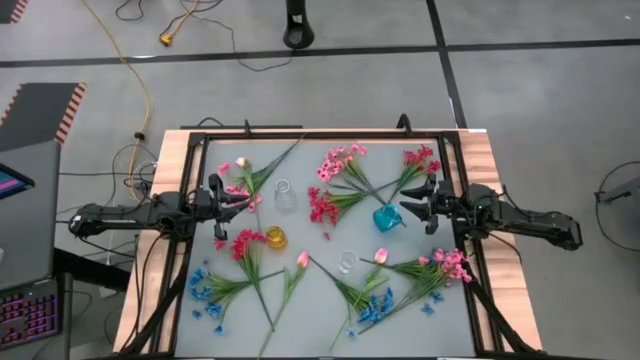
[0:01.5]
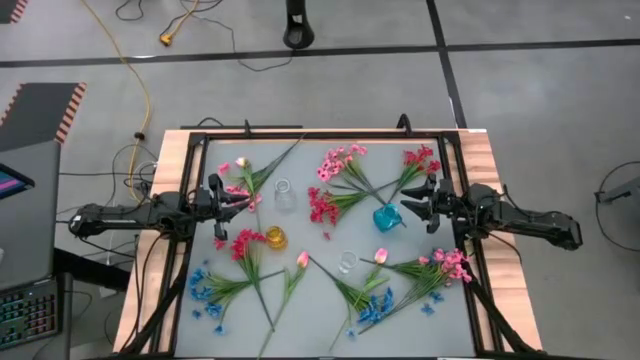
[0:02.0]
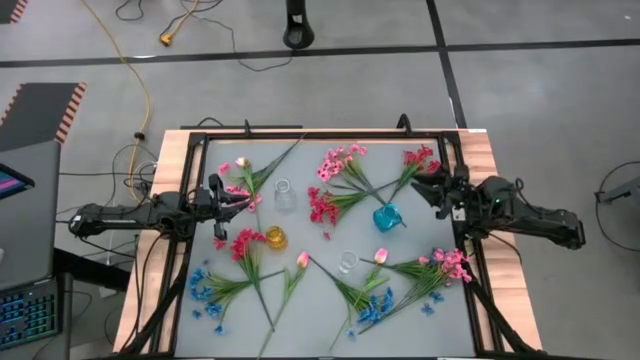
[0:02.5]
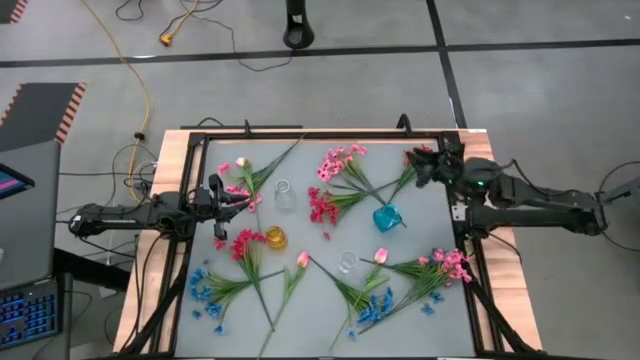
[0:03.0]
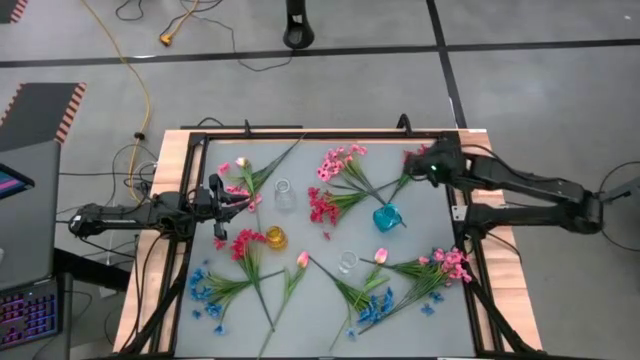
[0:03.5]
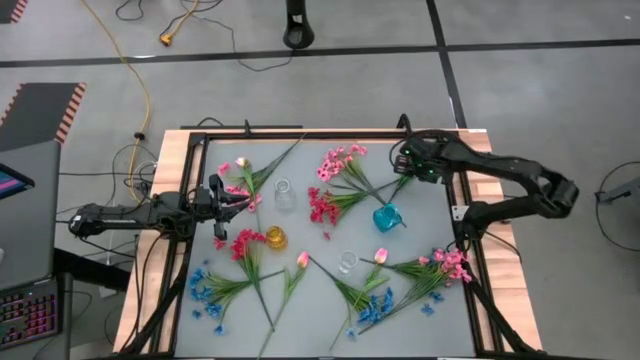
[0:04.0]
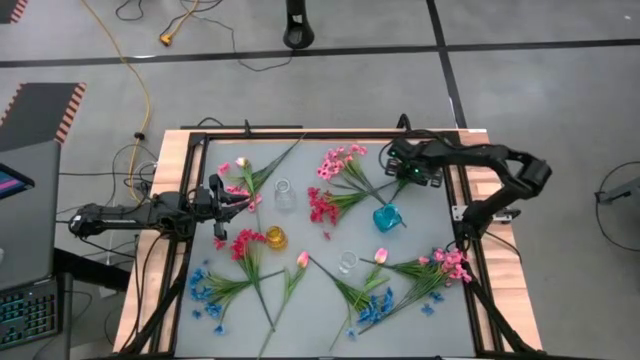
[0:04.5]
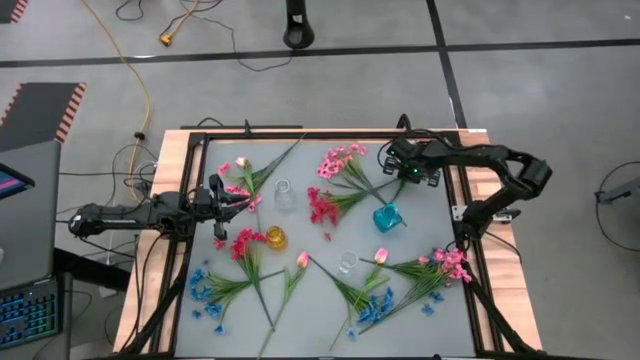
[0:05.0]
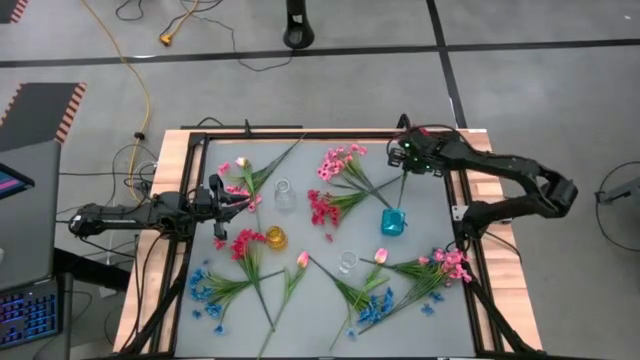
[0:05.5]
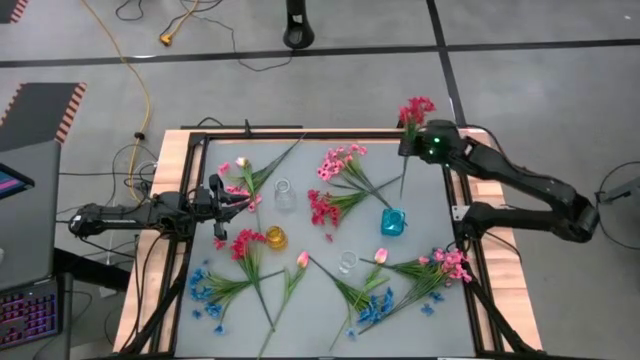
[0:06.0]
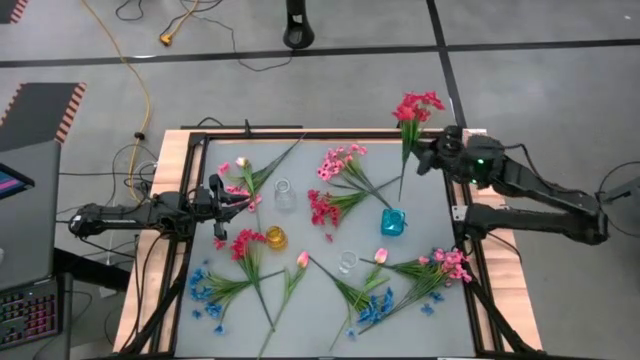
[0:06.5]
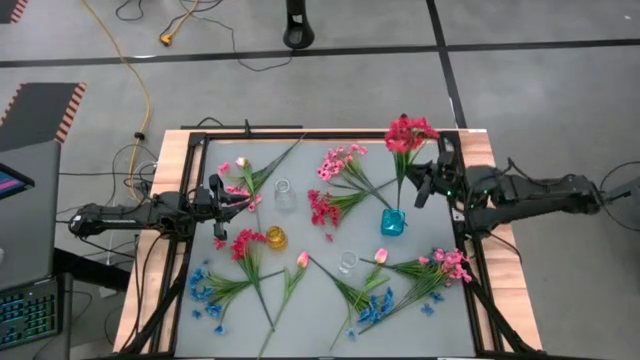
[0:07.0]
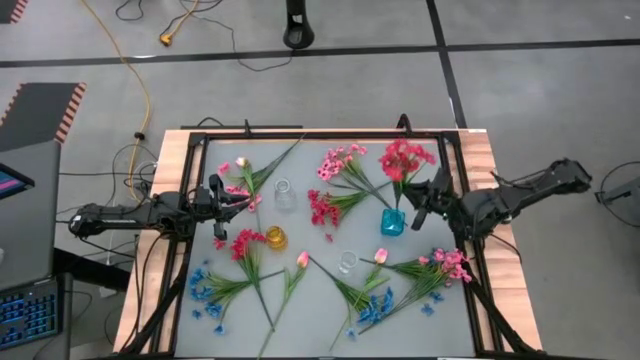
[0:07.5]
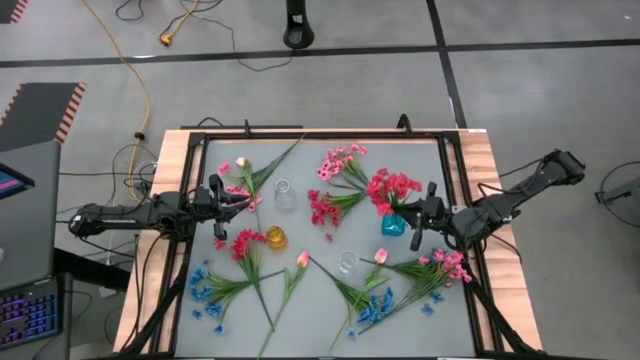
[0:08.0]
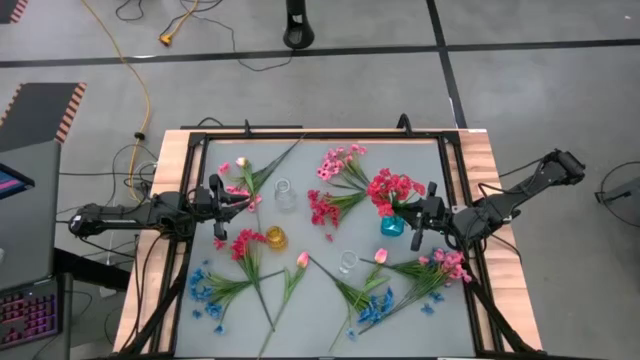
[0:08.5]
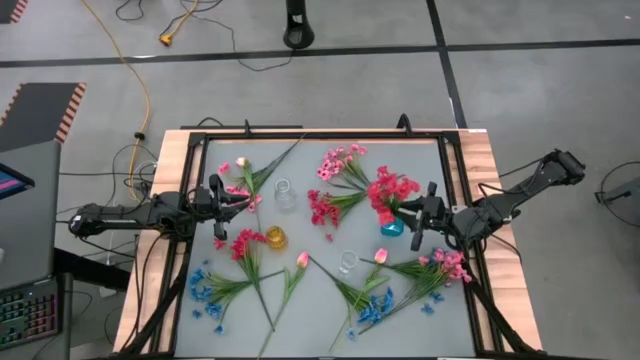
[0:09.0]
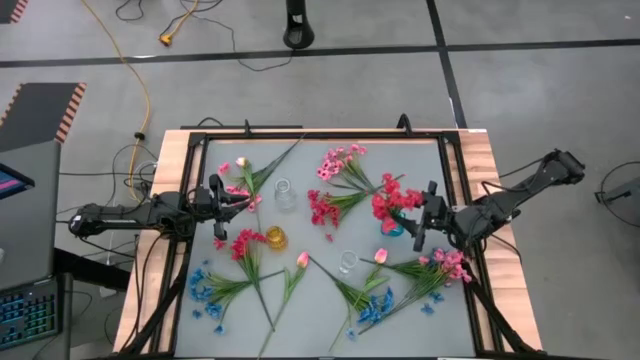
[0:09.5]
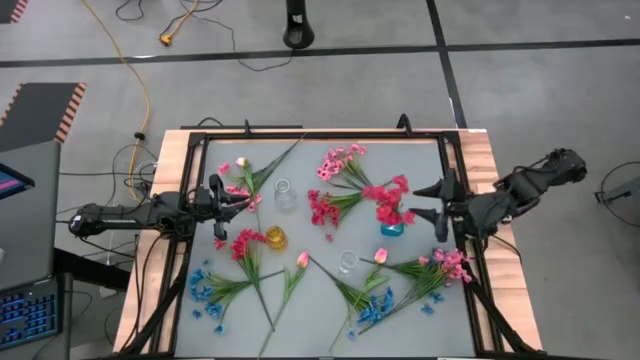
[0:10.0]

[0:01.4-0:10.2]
Task: Sort flowers into vase by color
Put the top right red flowers into the blue vase

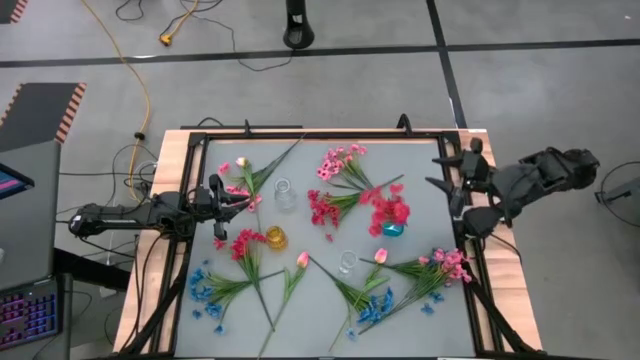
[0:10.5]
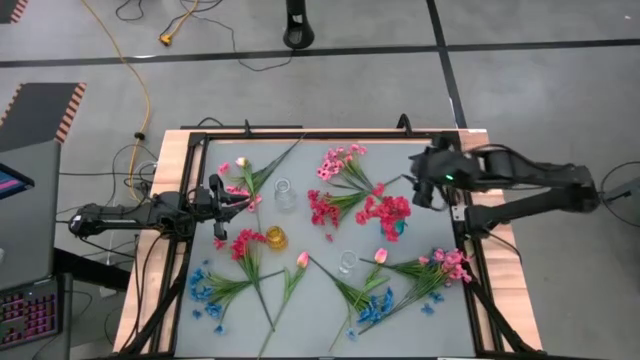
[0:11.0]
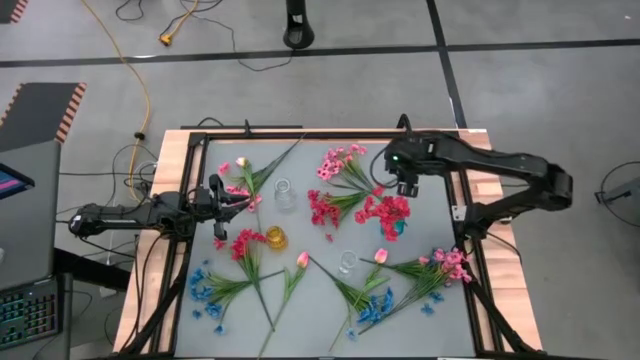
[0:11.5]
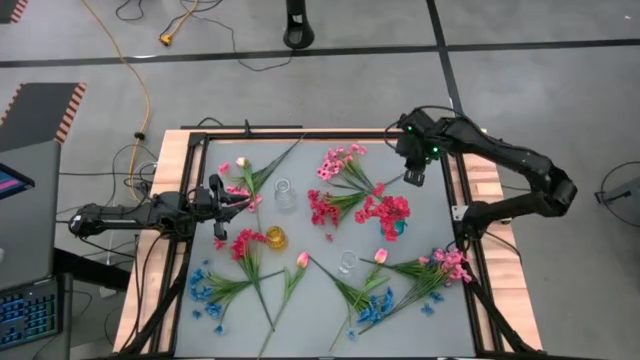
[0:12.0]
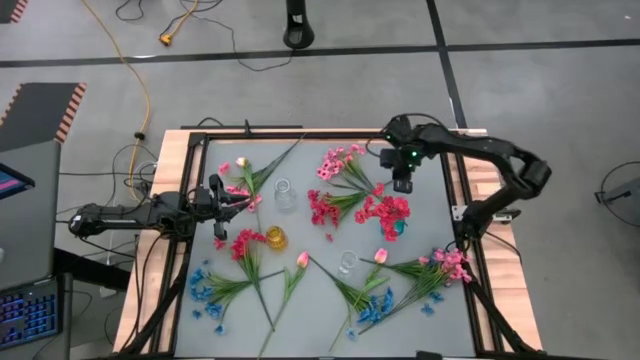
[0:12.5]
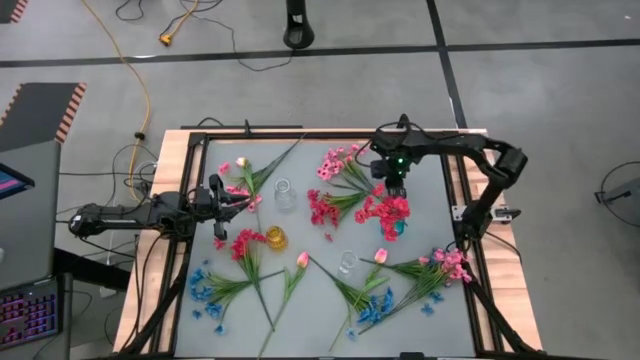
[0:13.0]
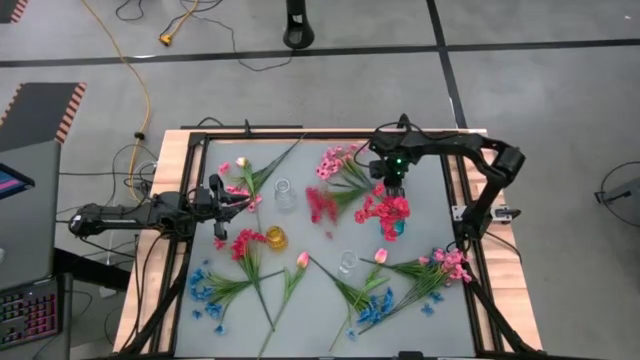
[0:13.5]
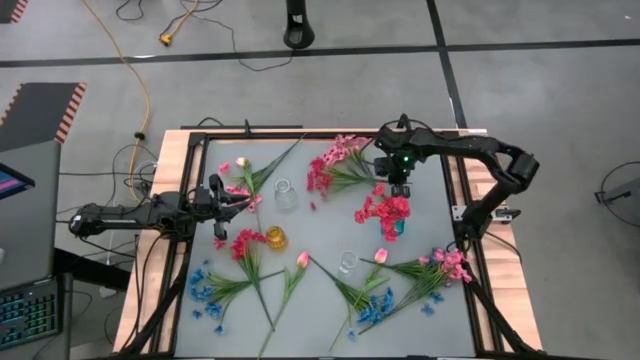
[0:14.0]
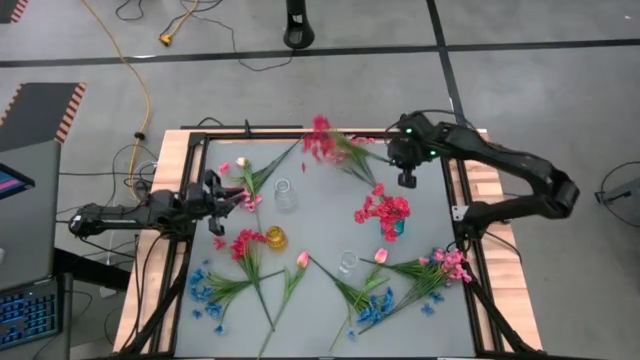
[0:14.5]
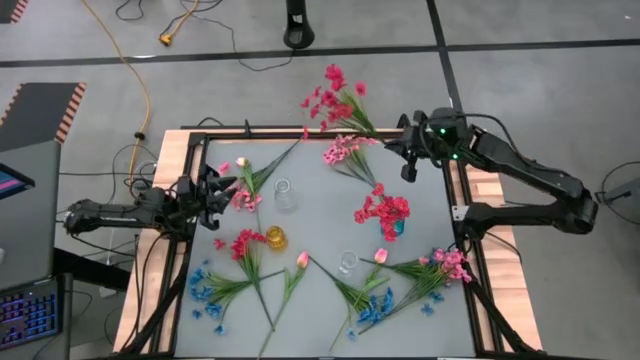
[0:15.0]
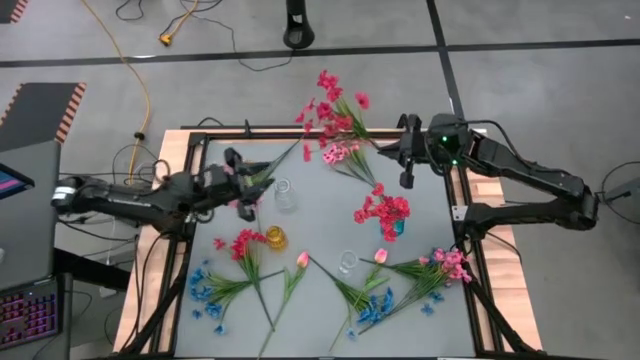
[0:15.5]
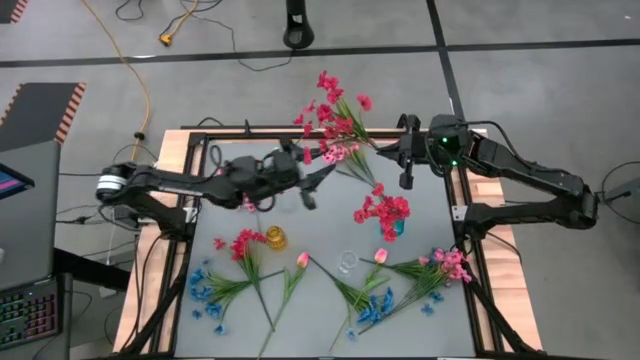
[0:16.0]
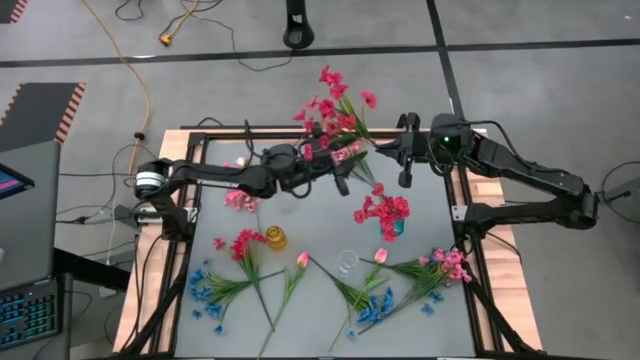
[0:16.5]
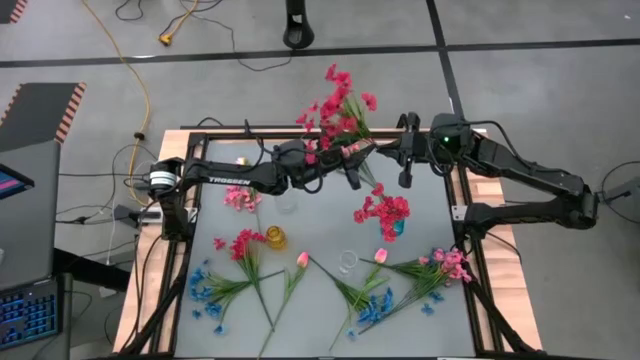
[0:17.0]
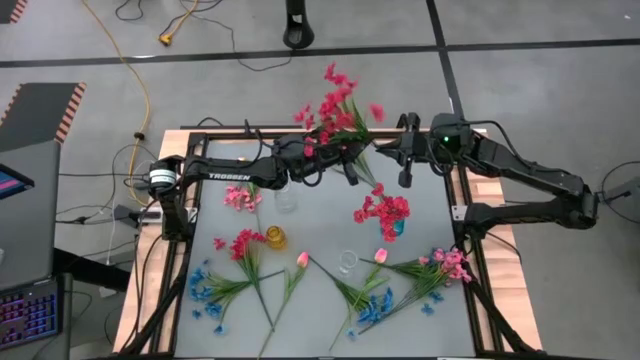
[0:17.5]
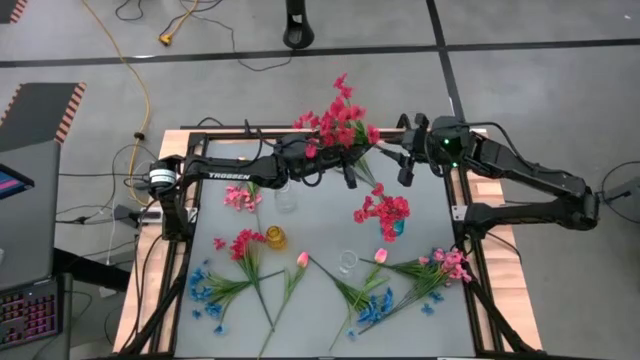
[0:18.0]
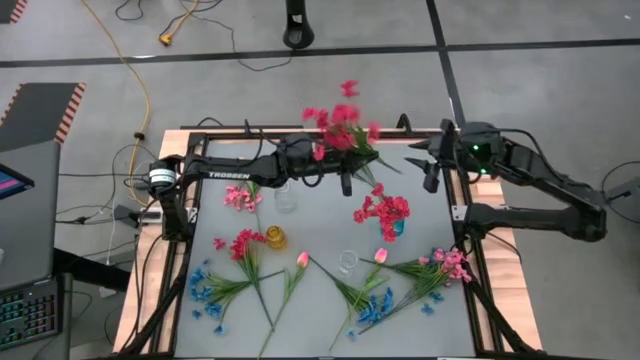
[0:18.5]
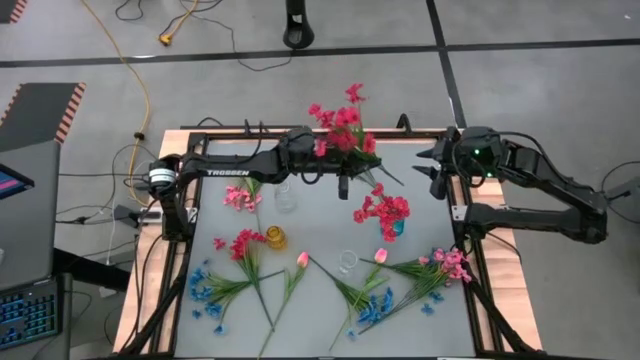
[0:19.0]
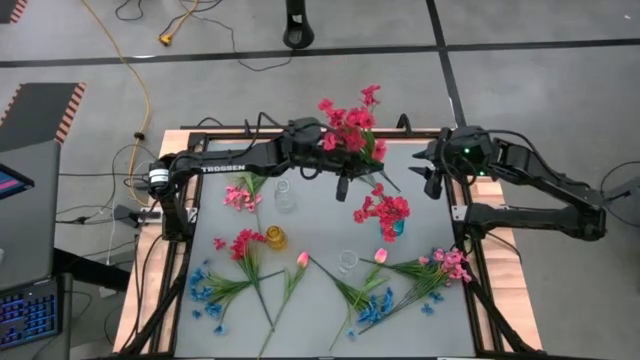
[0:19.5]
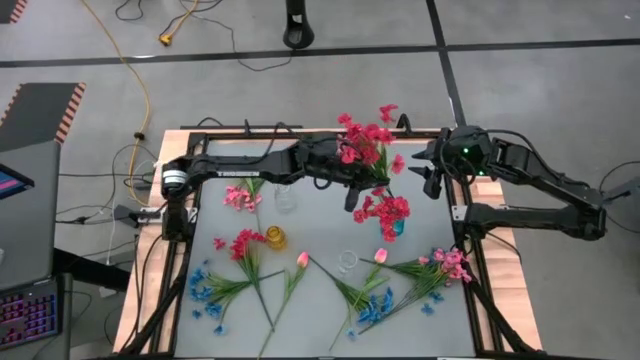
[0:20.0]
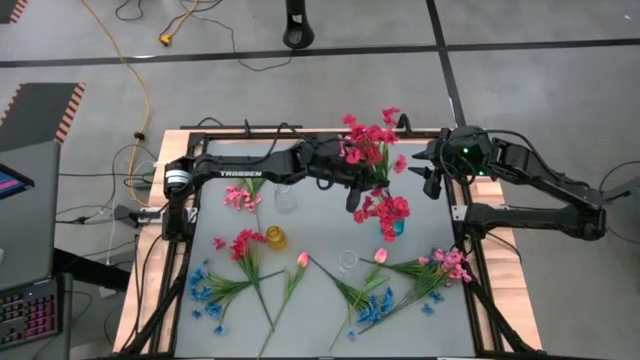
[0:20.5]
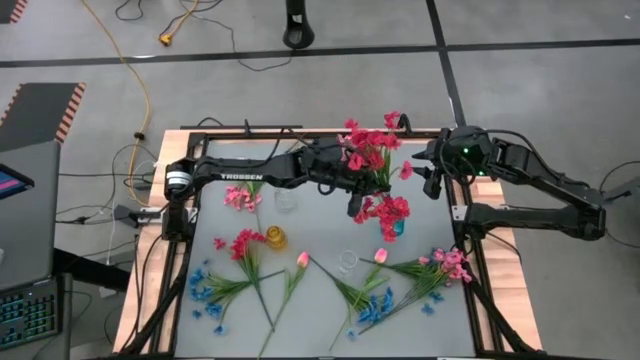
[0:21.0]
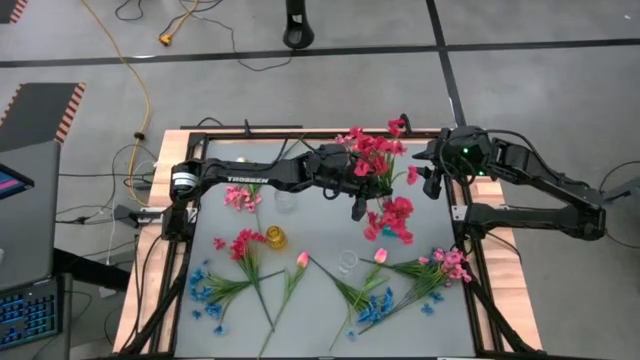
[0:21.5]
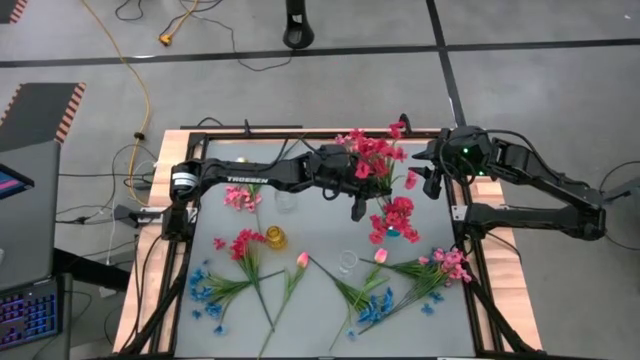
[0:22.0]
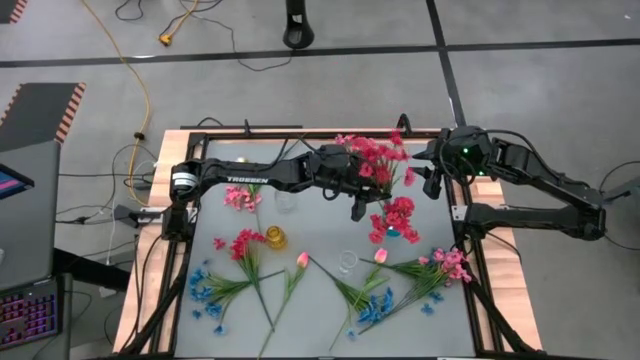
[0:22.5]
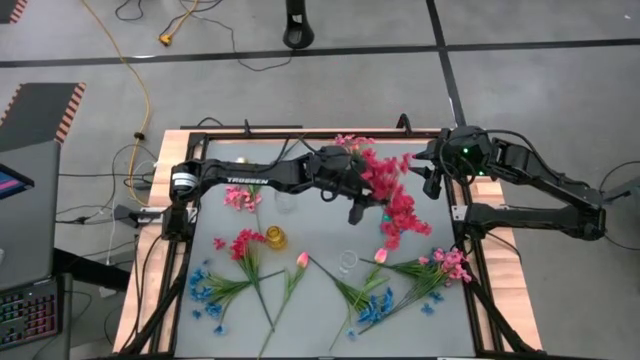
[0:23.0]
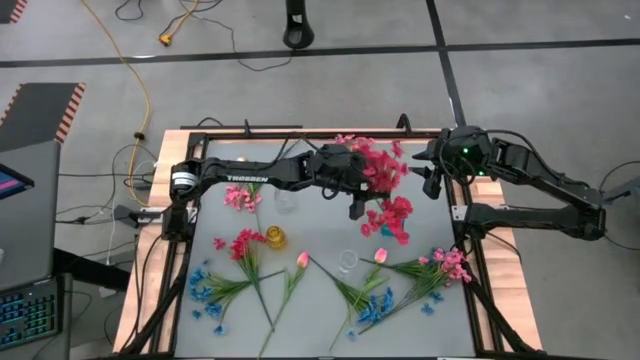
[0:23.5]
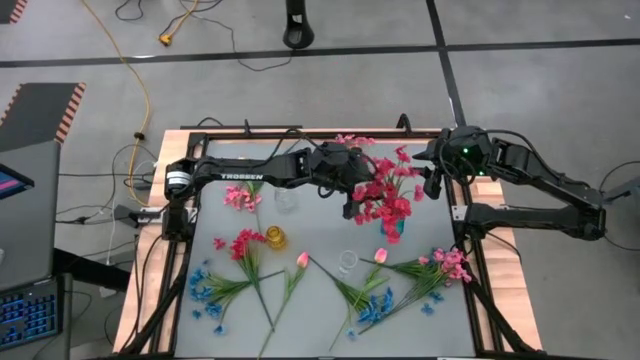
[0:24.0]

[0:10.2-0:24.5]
Put the top red flowers into the blue vase
